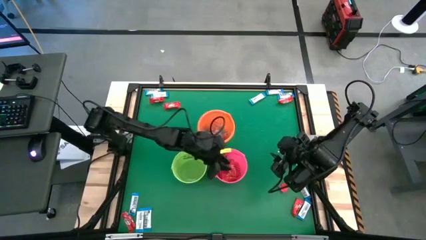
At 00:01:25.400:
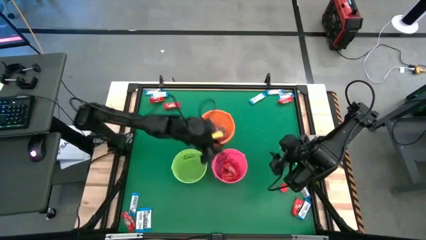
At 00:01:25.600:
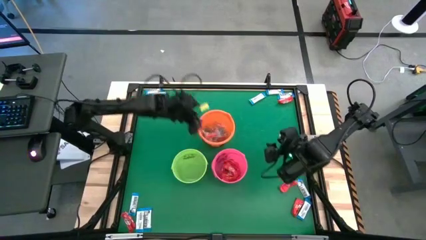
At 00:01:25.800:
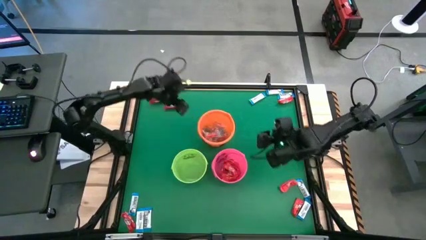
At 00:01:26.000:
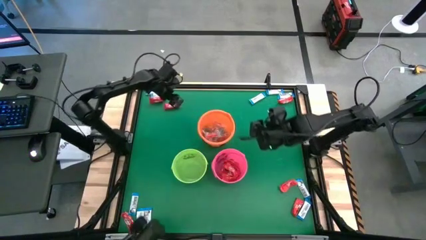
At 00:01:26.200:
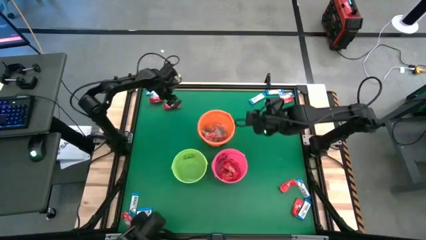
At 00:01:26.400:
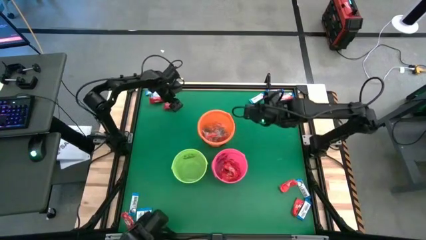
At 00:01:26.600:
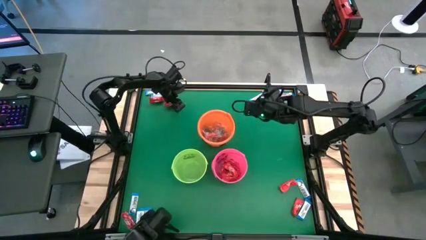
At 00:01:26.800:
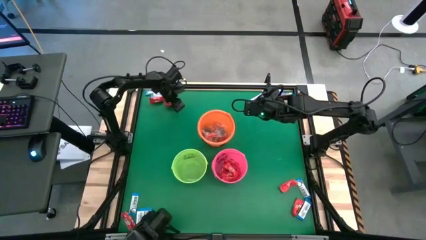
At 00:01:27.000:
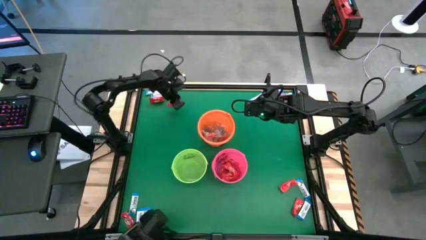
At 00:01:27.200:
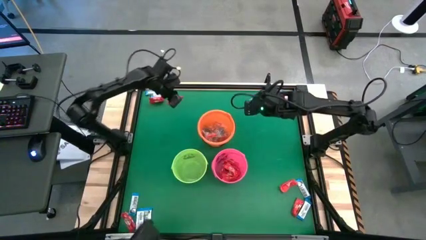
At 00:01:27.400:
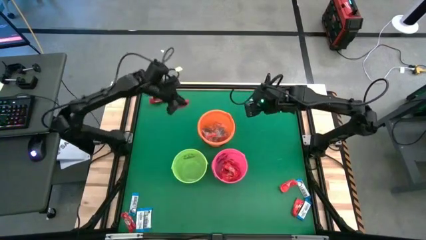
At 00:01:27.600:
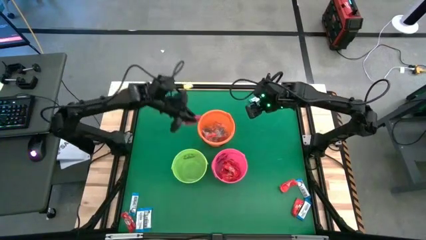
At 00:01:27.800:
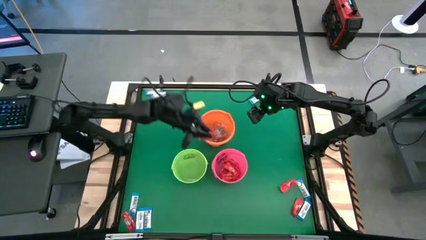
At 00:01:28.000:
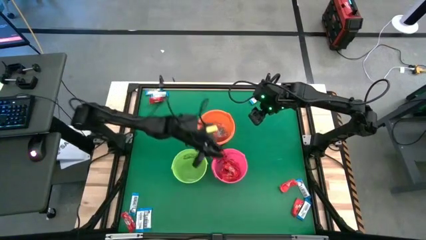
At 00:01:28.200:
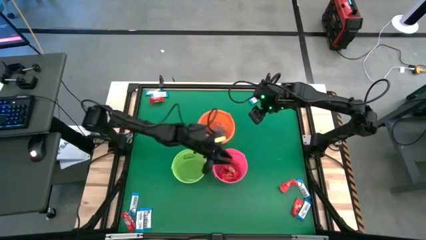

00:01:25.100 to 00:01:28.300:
Task: Sort candy by brand, put in halloween buckets
Put the red chocolate bar into the pink bucket

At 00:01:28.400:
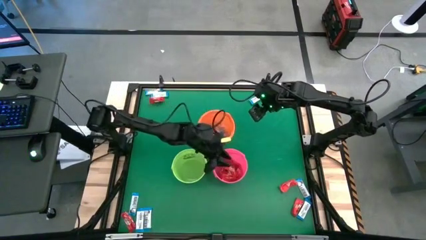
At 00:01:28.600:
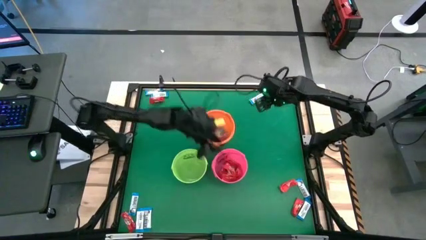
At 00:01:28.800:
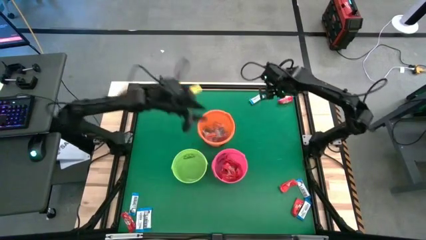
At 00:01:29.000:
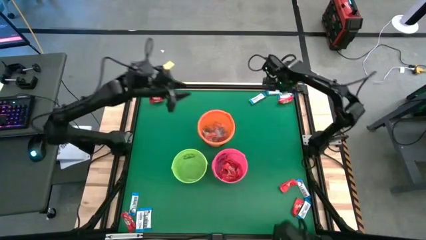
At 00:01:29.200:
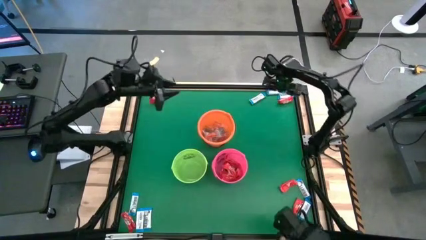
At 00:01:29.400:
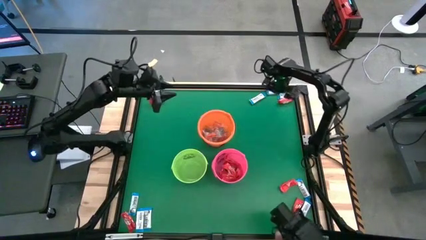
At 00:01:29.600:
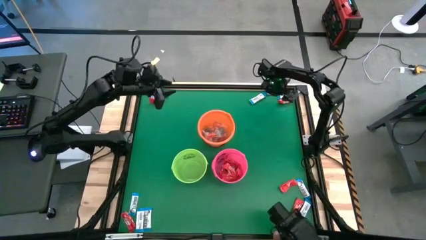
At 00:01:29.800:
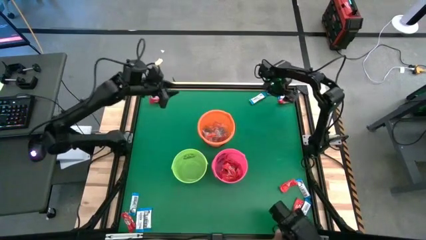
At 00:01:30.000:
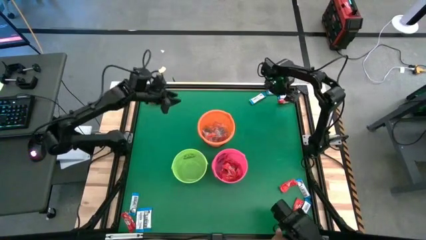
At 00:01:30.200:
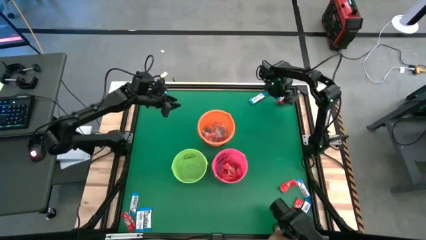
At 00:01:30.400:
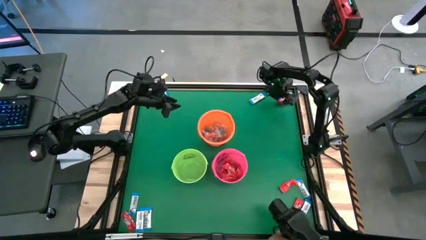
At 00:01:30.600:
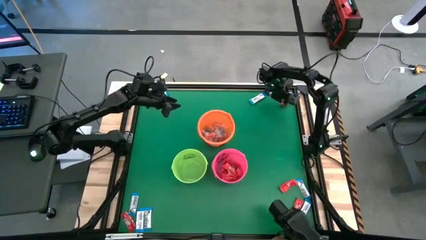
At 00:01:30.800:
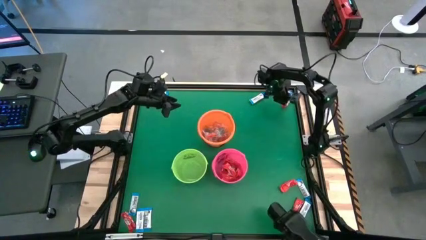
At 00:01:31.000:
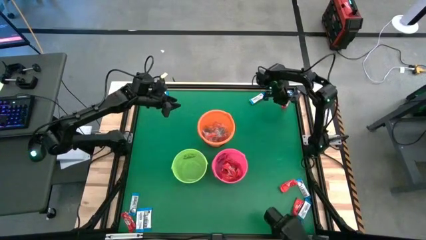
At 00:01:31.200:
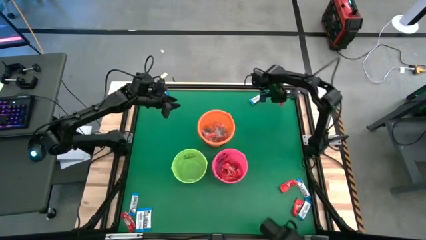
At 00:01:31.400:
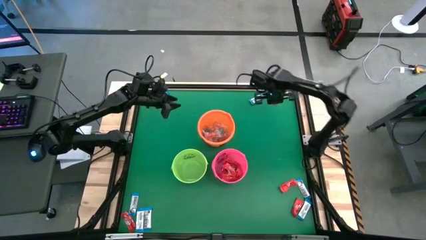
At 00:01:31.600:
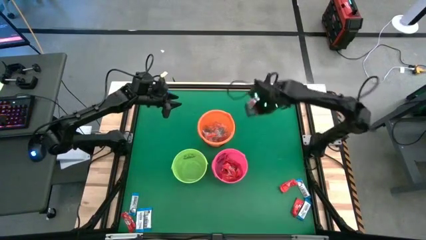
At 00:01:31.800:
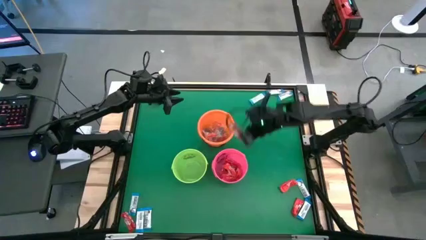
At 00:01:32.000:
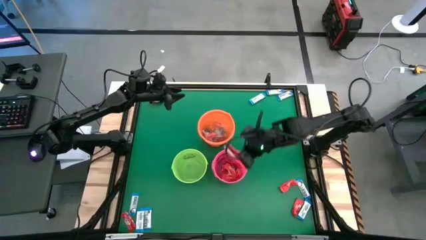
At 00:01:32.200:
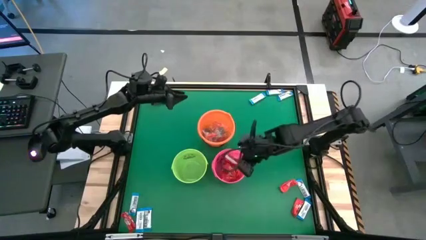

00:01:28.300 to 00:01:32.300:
Put the red chocolate bar into the pink bucket

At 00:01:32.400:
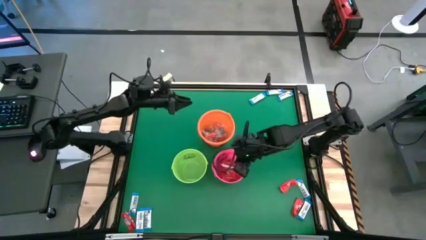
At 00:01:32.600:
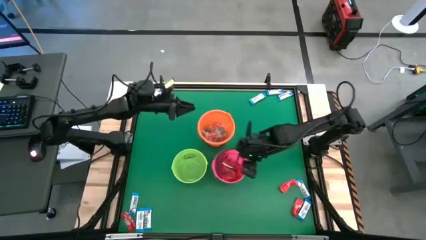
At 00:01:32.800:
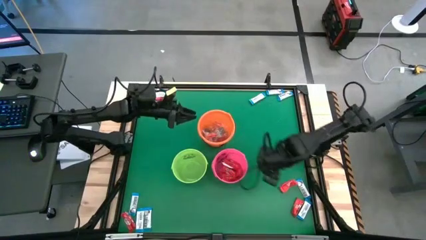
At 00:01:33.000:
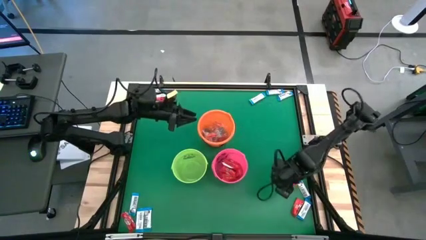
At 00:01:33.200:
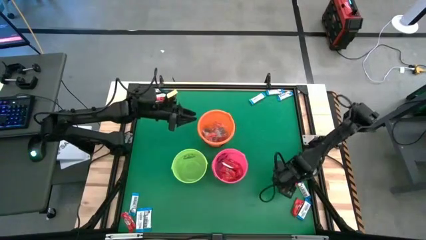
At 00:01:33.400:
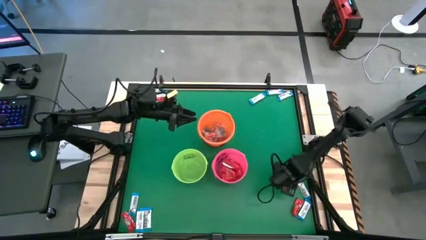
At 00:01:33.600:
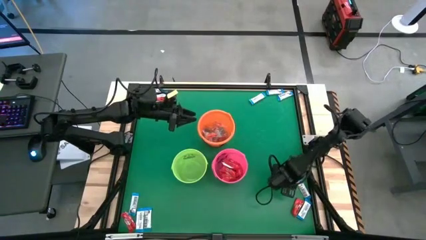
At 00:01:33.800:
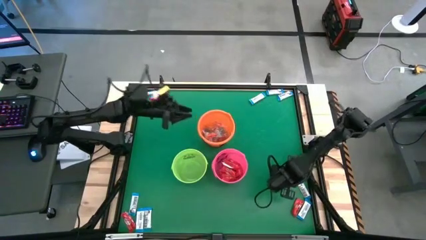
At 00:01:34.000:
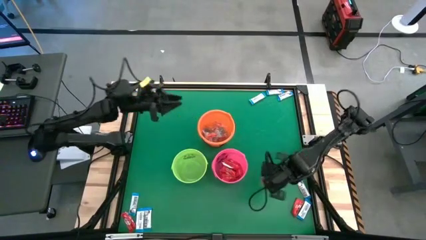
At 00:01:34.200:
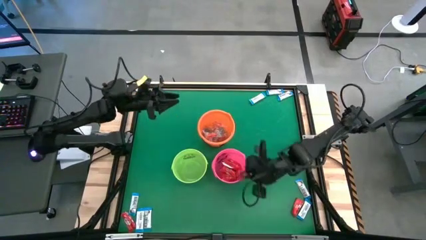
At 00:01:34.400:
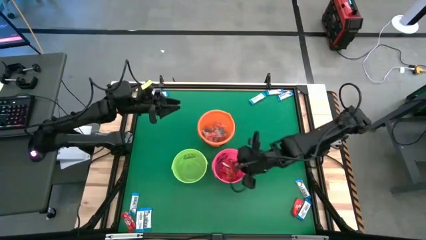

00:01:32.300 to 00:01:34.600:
Put the red chocolate bar into the pink bucket

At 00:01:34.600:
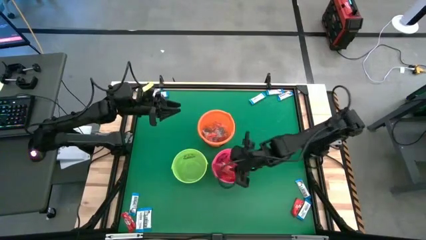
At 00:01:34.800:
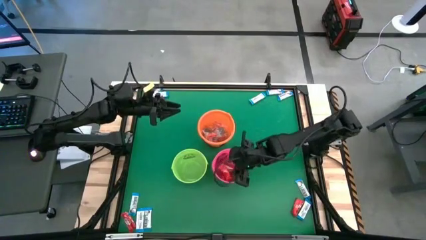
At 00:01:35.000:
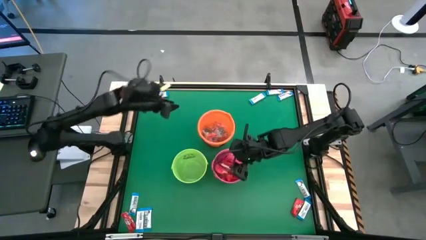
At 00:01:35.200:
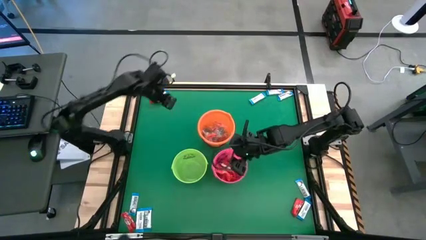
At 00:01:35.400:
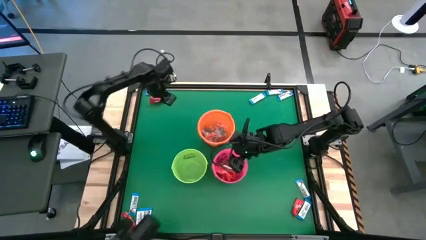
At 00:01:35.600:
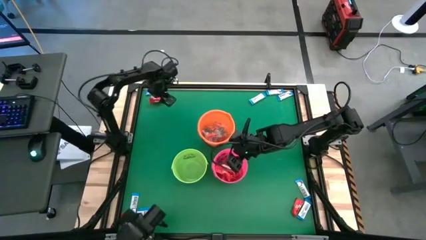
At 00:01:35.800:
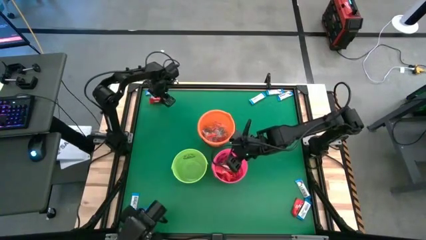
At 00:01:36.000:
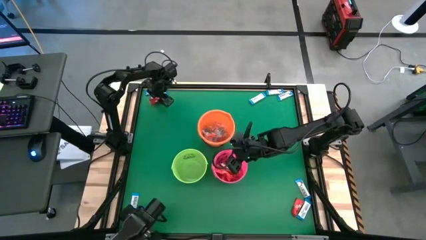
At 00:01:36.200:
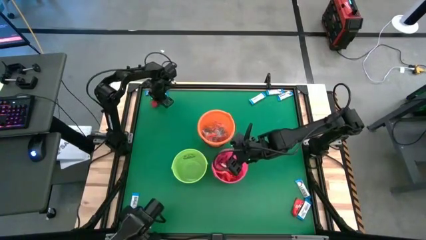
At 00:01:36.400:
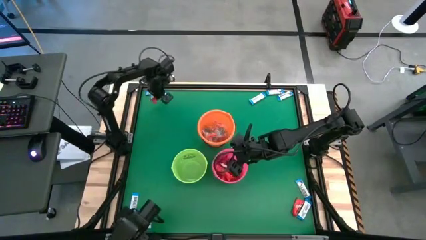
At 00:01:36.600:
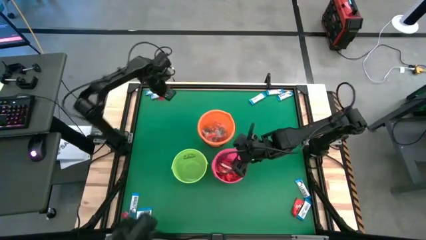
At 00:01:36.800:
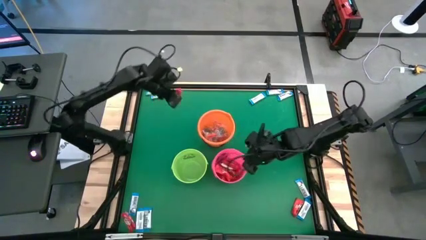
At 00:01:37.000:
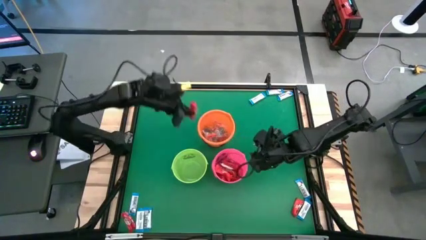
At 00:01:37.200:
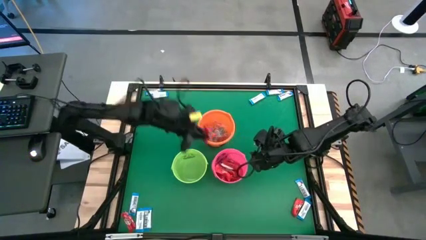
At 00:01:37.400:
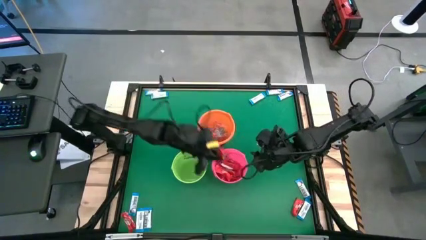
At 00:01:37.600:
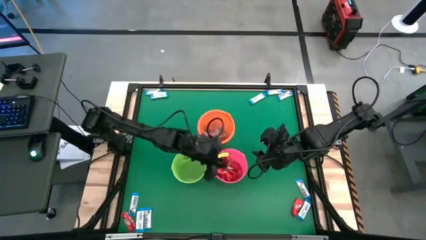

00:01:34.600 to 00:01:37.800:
Put the red chocolate bar into the pink bucket

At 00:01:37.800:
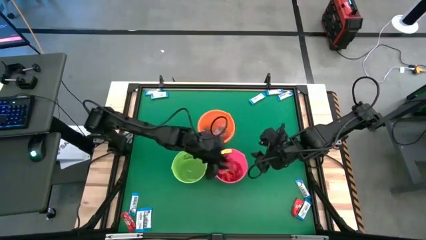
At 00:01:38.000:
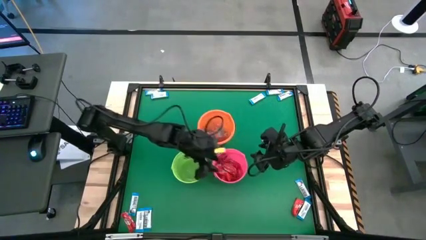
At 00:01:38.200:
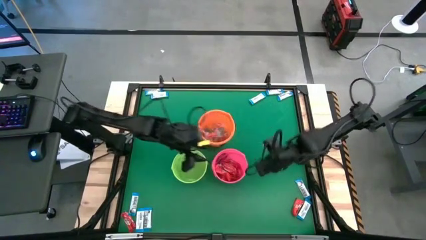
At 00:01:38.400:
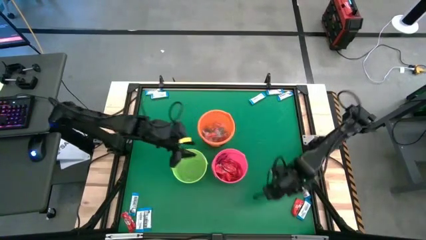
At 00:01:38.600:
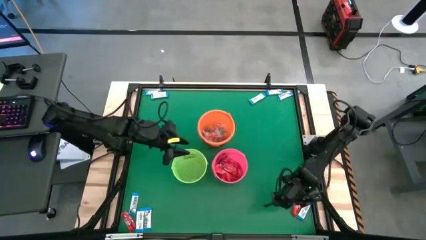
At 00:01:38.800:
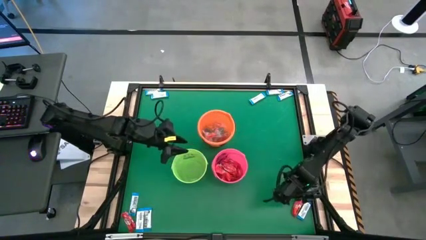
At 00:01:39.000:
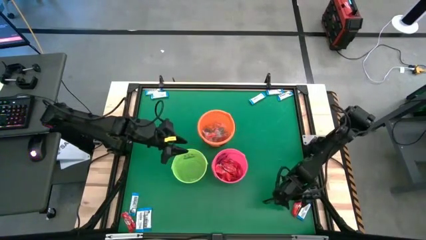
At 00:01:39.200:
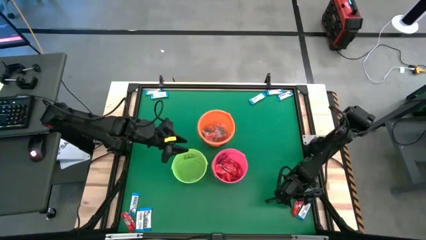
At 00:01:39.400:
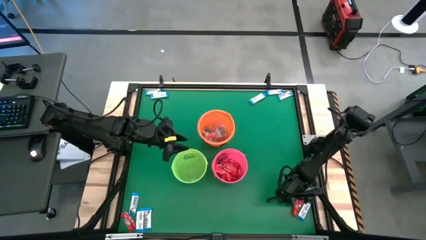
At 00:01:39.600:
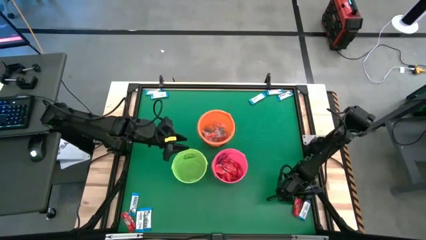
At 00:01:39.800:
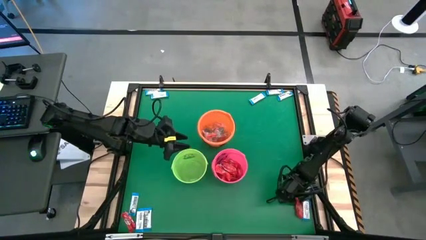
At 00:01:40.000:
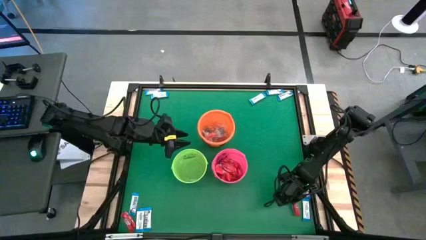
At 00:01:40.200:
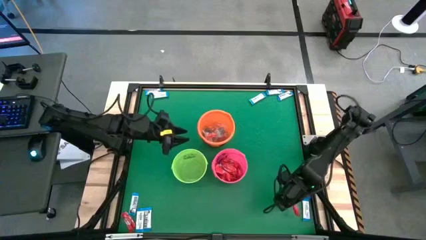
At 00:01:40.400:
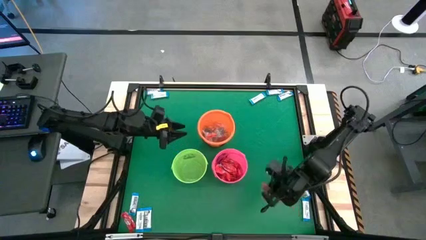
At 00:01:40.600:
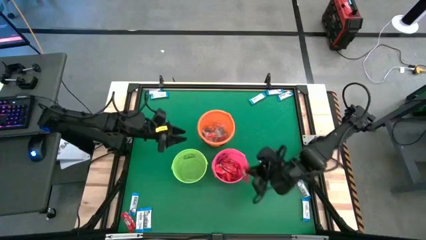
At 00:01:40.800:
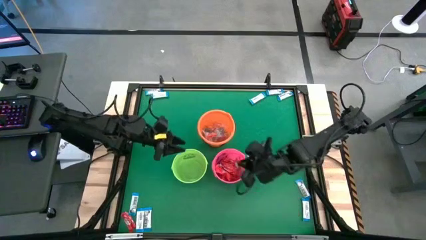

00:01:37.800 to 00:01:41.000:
Put the red chocolate bar into the pink bucket

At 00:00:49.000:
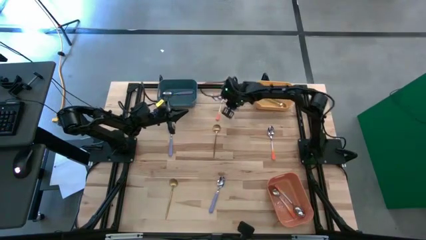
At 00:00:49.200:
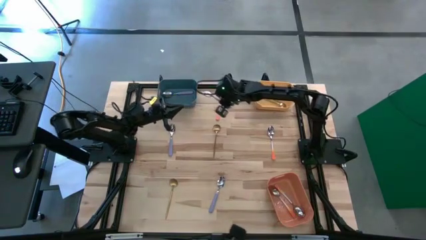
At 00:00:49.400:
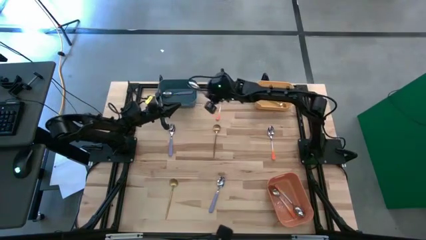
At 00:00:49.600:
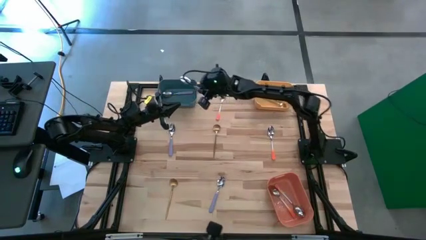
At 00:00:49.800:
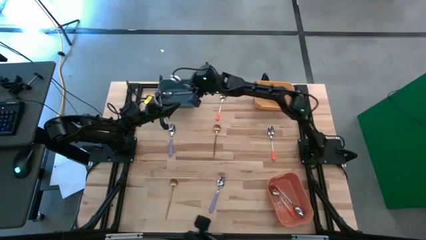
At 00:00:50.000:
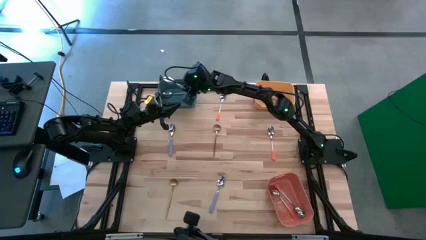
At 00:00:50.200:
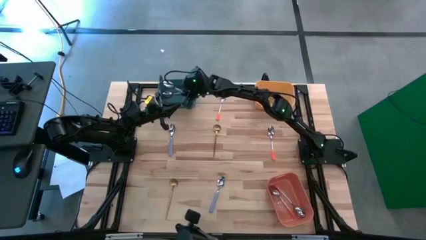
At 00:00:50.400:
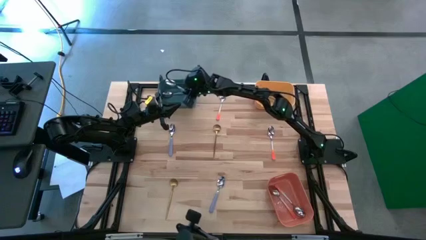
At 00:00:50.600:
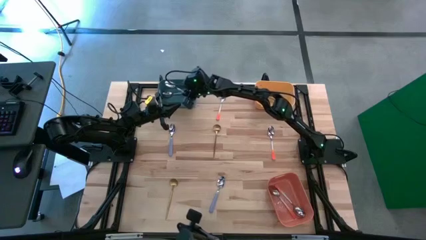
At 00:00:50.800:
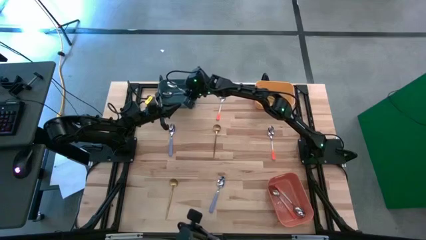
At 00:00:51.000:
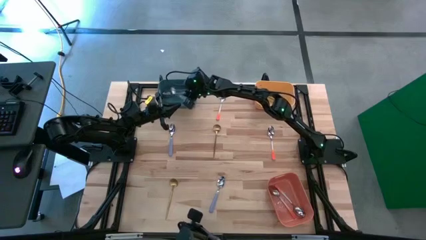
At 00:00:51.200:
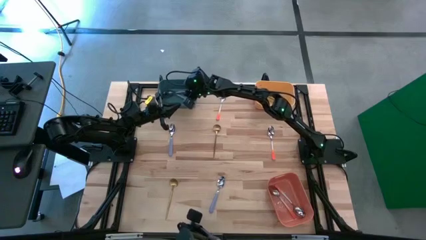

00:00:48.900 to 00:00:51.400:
Task: Sort silverware by color (type)
Put the top center violet spoon into the dark green bin
